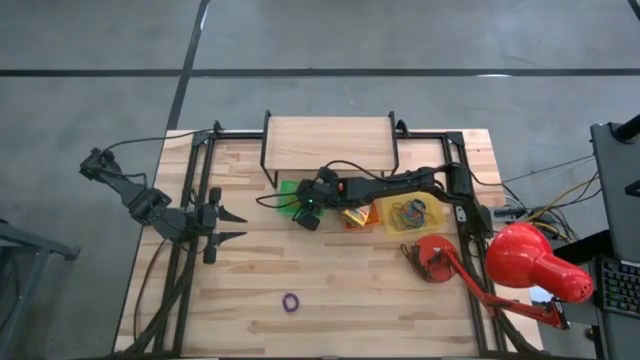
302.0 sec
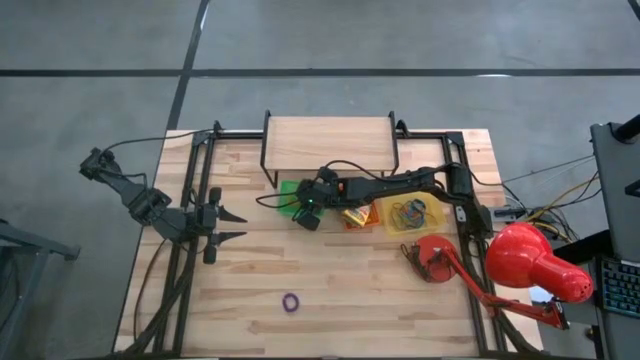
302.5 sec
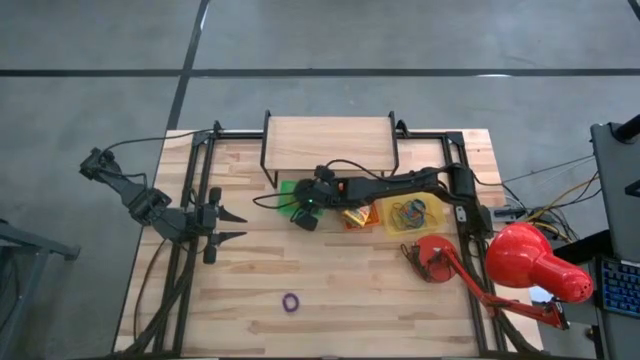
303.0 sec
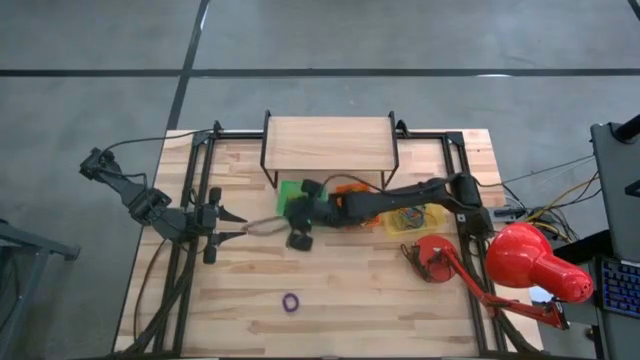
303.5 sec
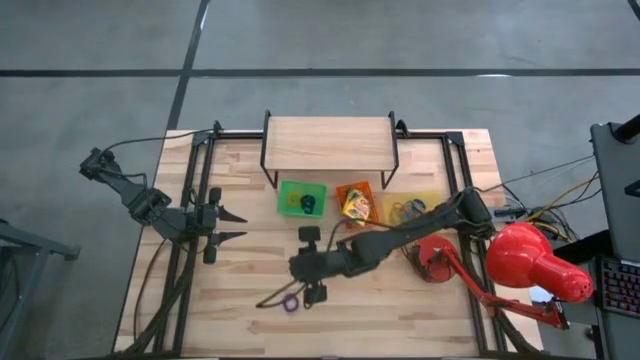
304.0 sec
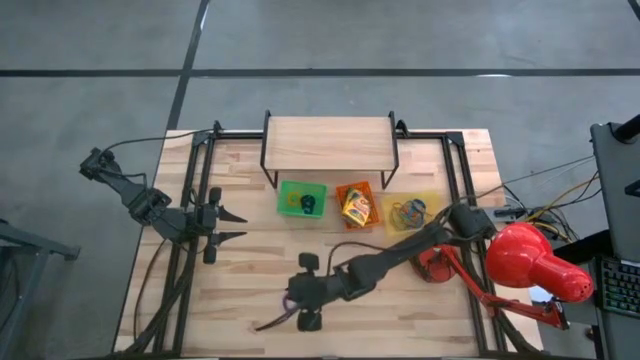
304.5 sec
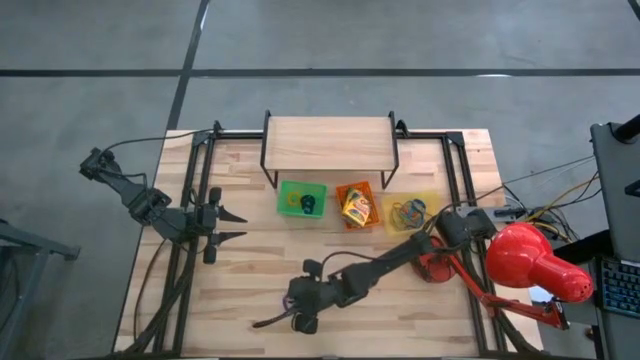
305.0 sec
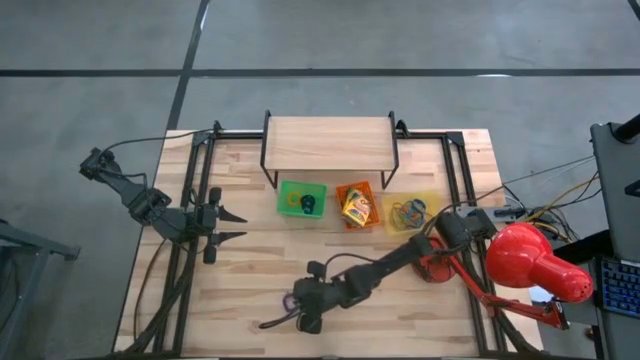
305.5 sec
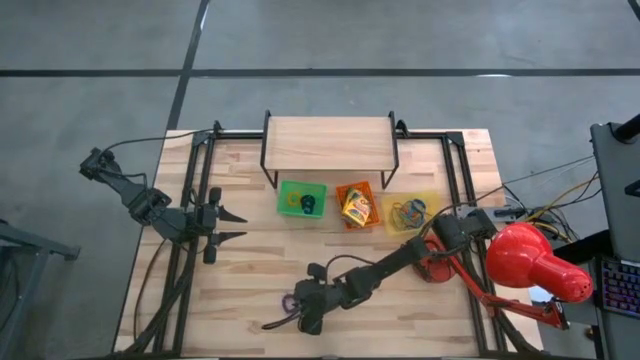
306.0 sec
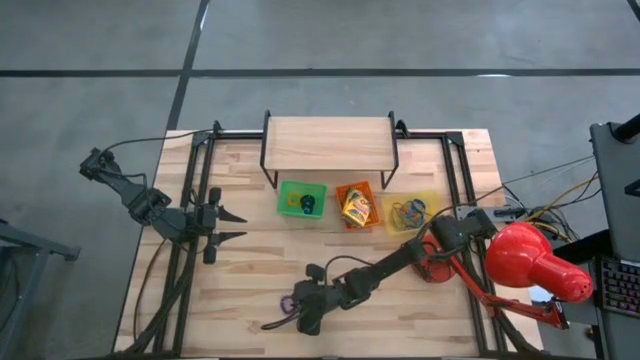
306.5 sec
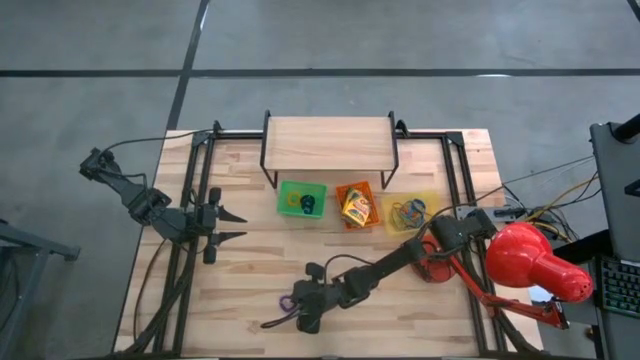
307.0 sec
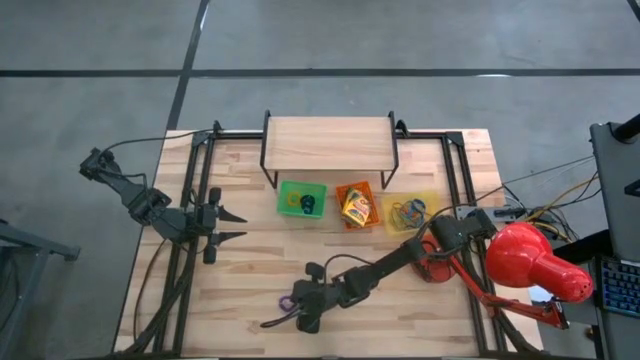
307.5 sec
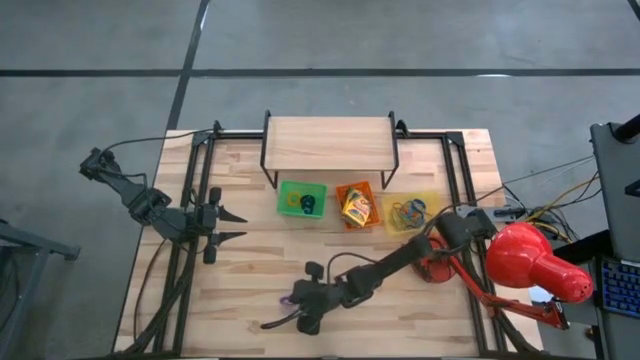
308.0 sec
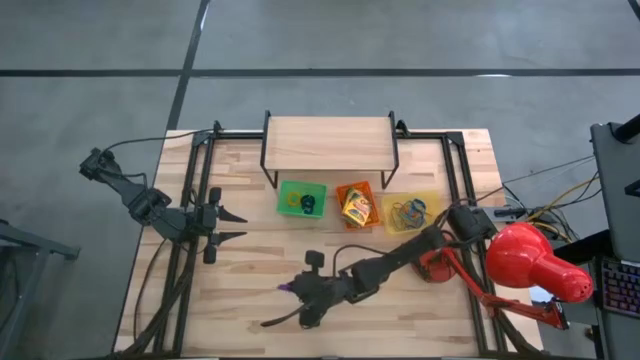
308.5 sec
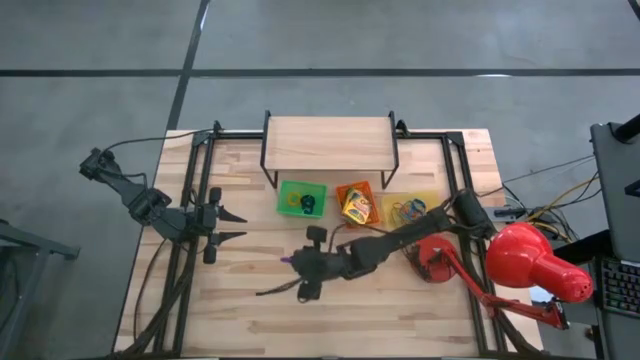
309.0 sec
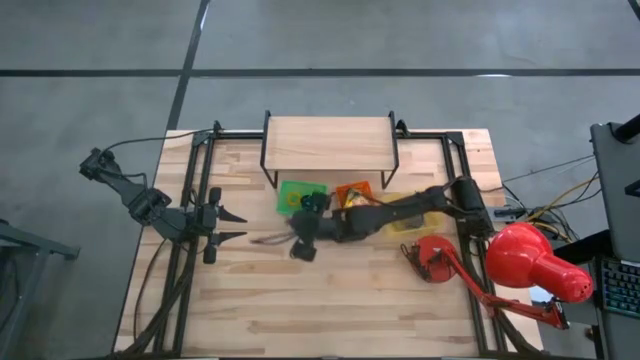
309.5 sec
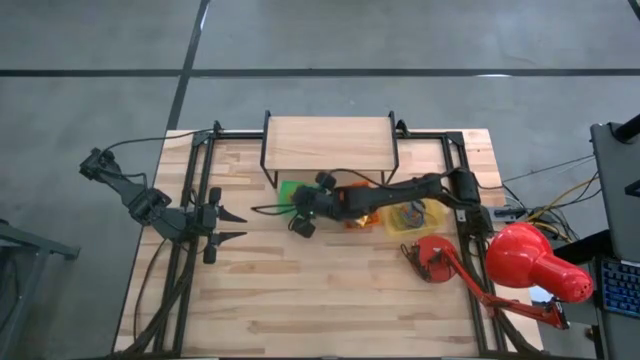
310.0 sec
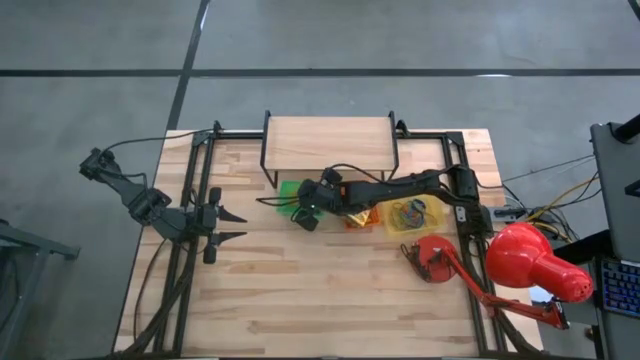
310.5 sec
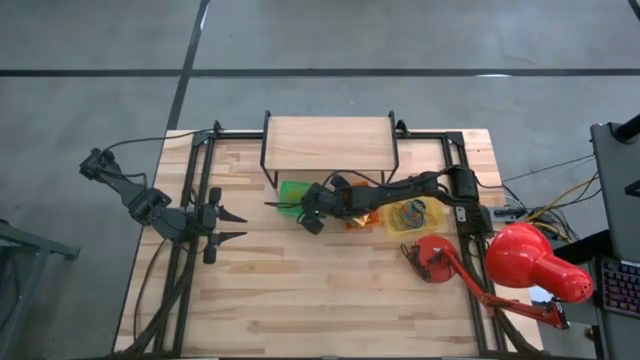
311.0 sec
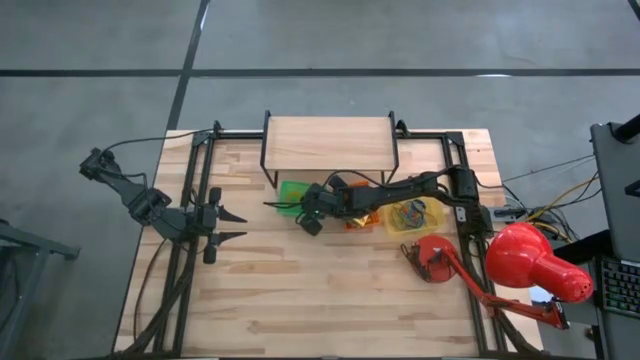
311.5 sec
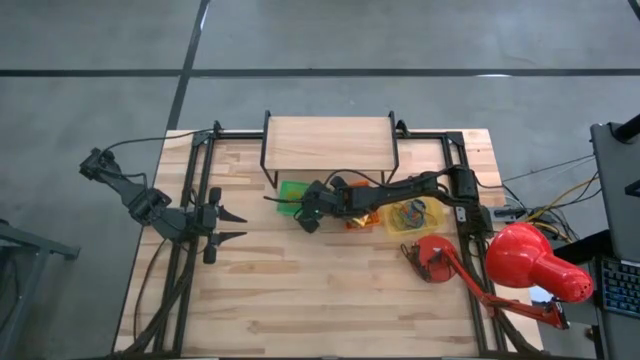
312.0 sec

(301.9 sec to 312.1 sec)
Task: Pick & Place Office Desk Supplies
Put the purple spring rubber band into the green bin

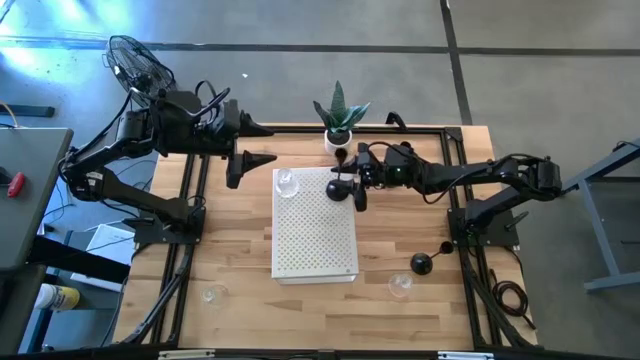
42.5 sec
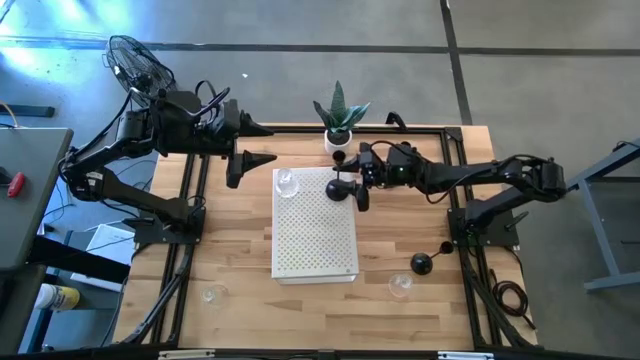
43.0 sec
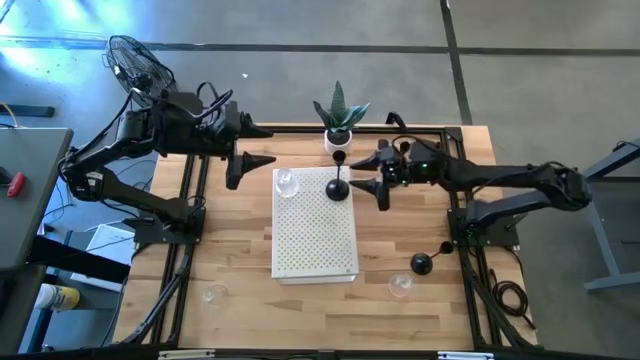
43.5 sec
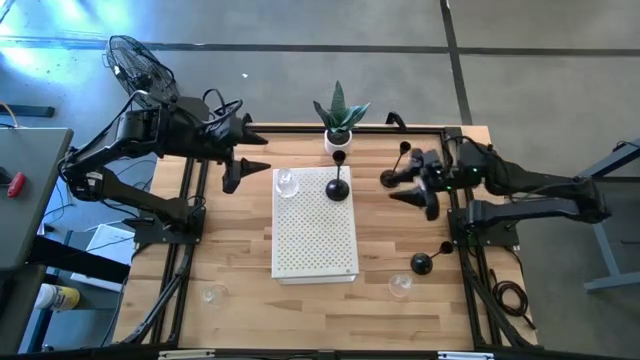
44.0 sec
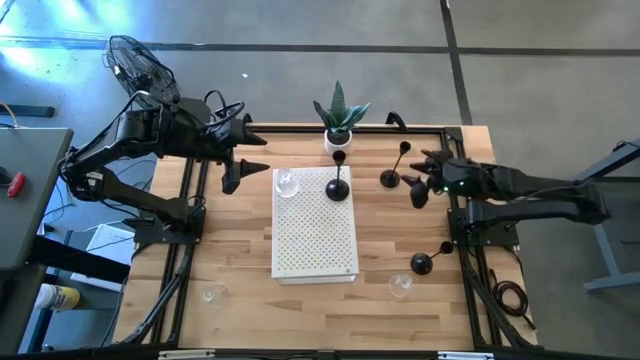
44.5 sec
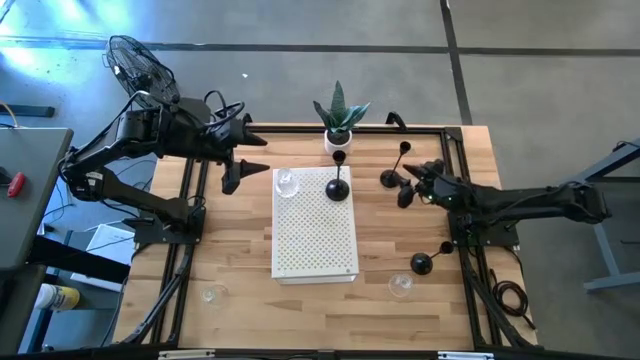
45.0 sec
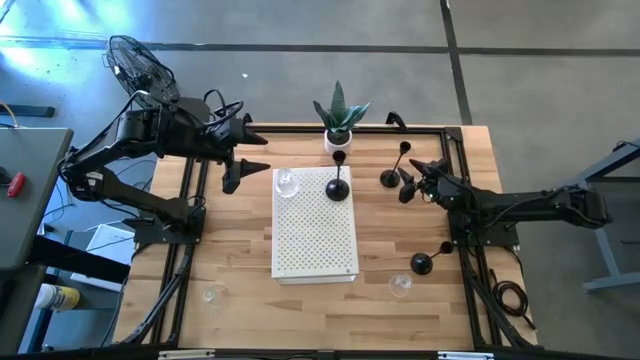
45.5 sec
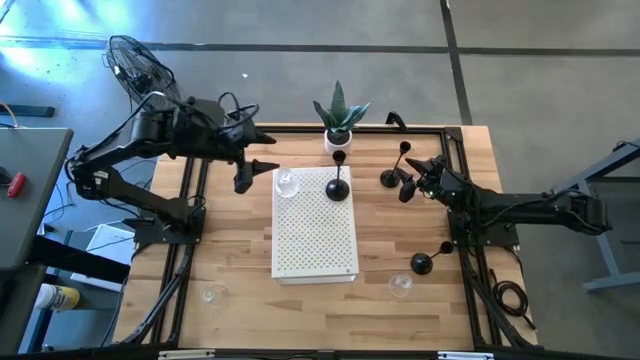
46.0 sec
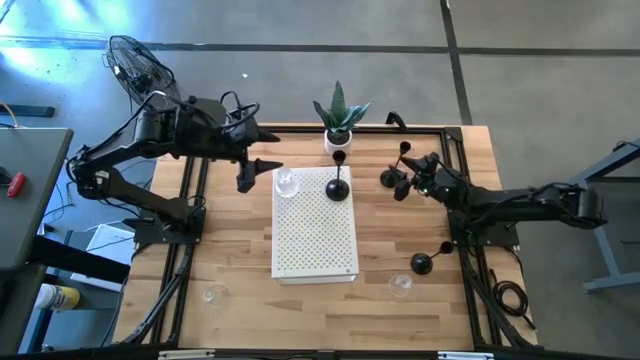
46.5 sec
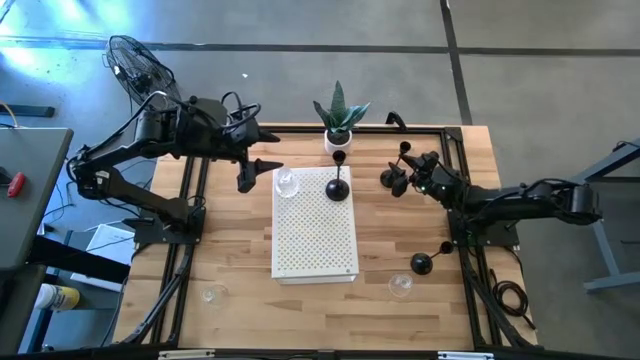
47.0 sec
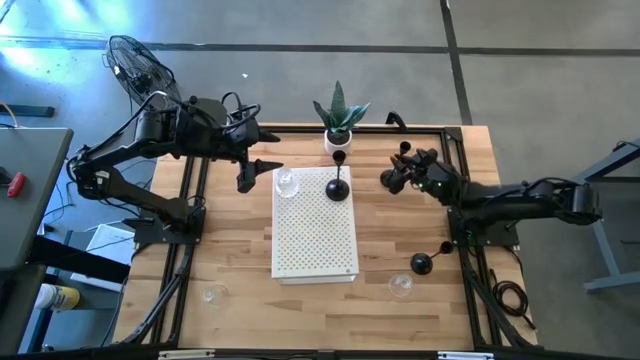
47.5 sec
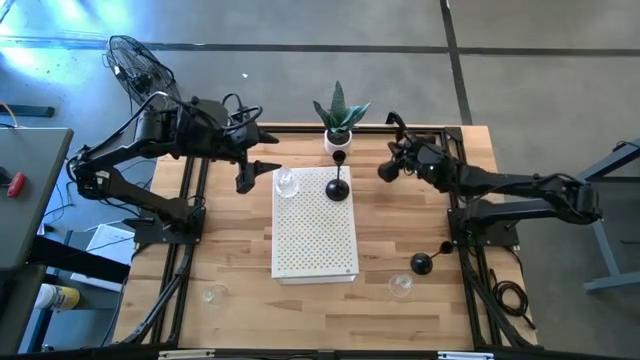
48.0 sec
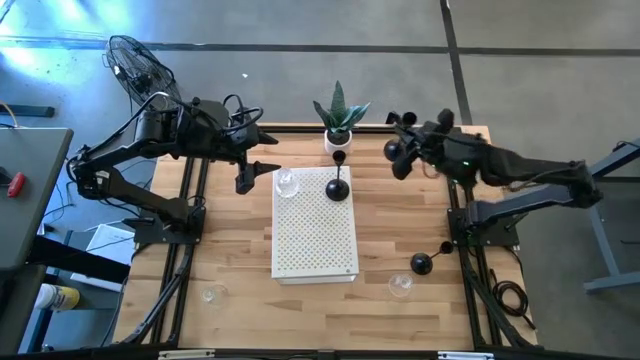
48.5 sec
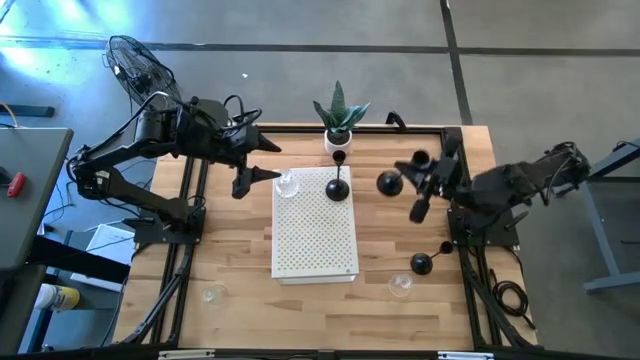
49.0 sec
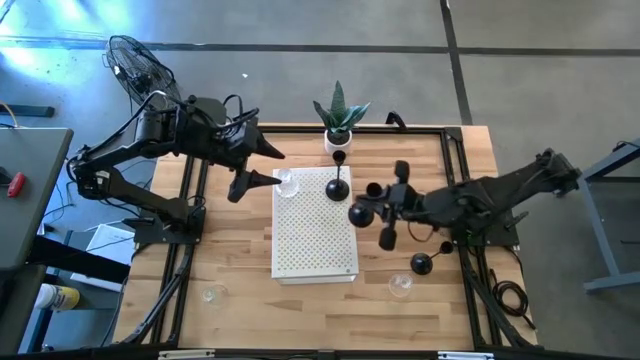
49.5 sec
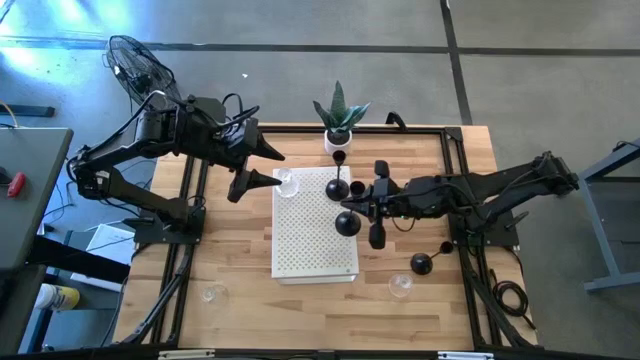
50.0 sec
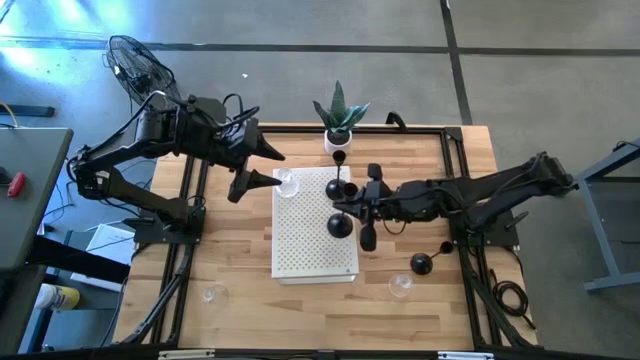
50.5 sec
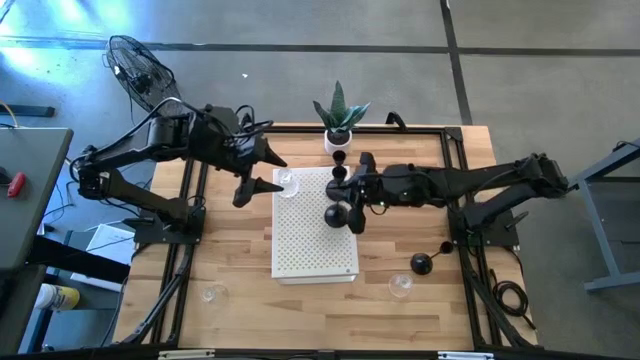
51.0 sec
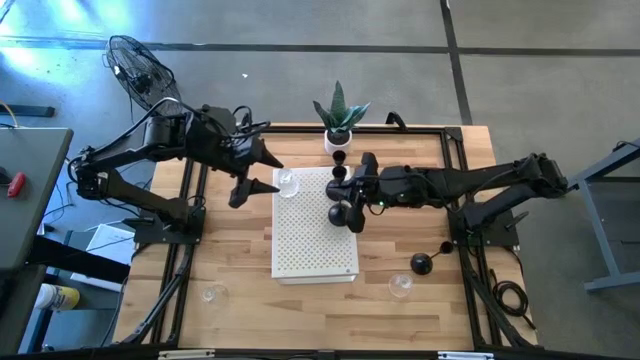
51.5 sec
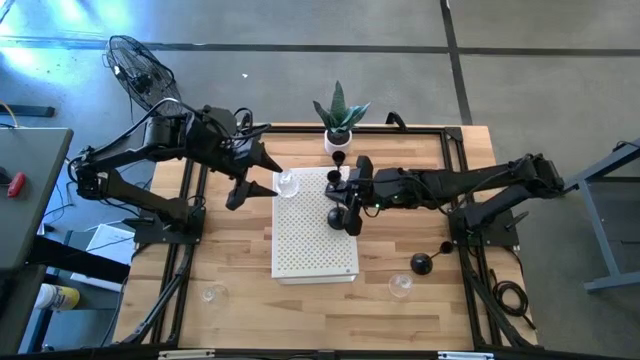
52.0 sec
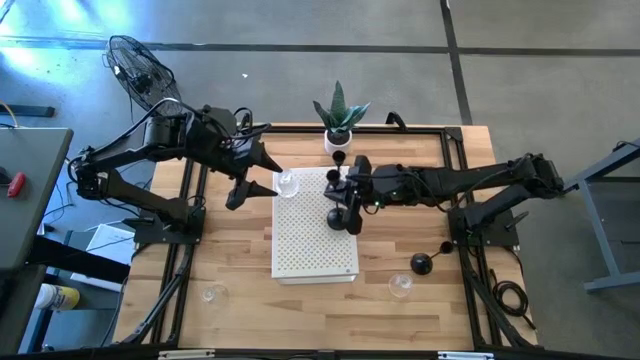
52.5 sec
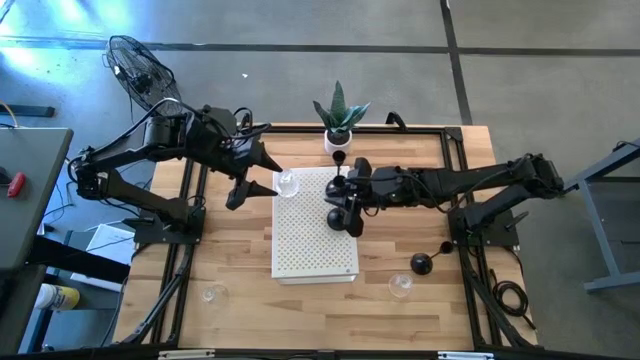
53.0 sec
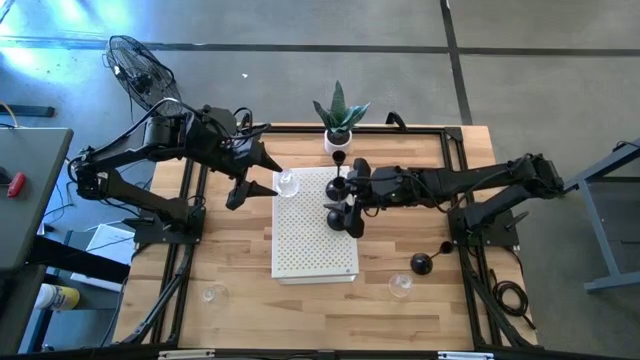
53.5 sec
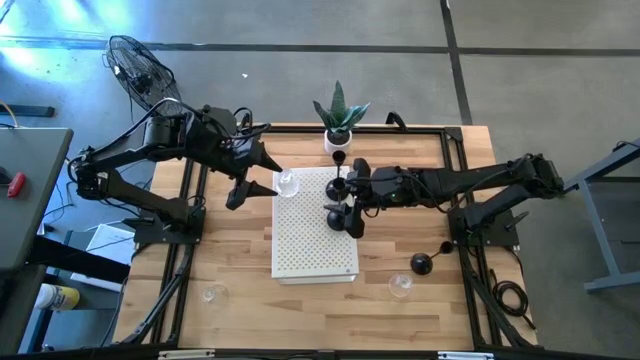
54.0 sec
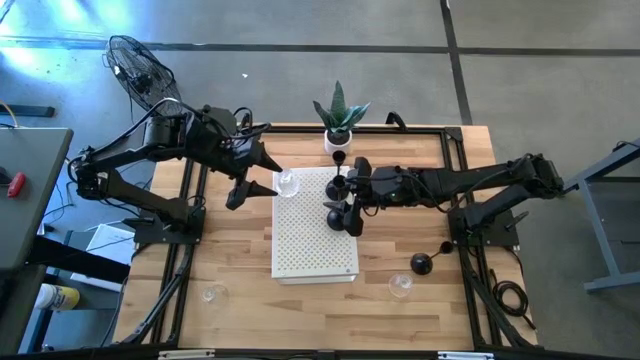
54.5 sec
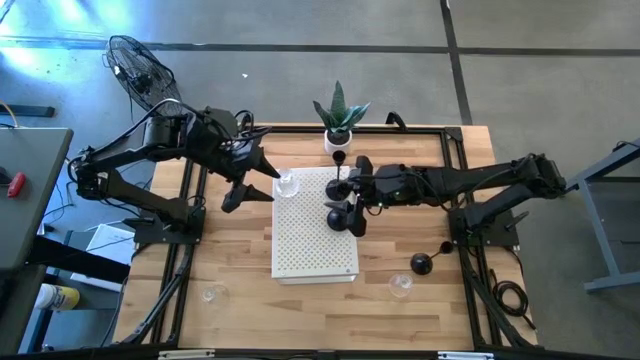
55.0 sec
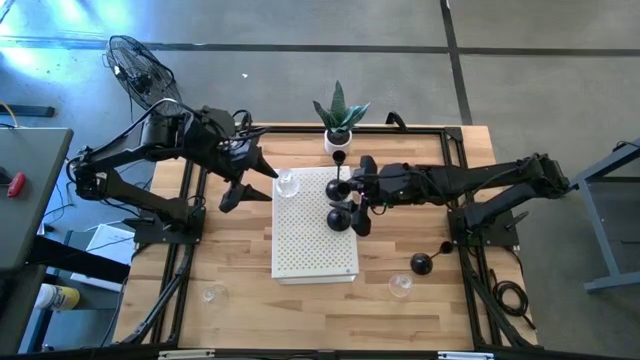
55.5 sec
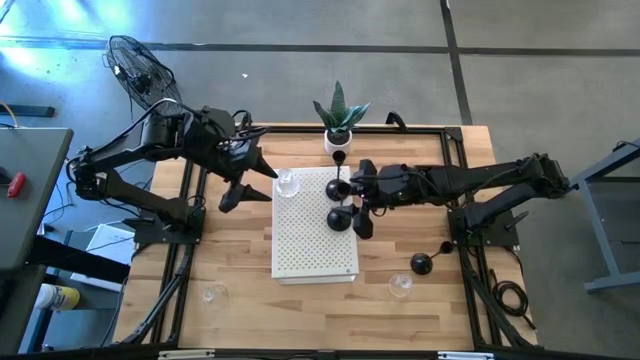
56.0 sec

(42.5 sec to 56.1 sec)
Task: Pick & Place candle stick holders
Put the top black candle holder on the shelf aligned with the other black candle holder
